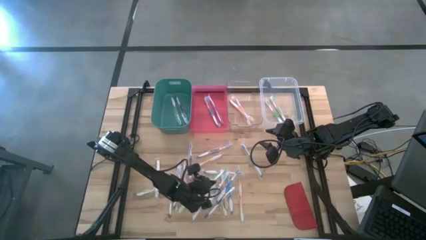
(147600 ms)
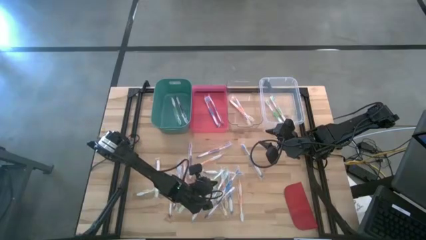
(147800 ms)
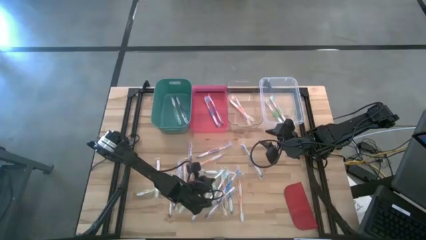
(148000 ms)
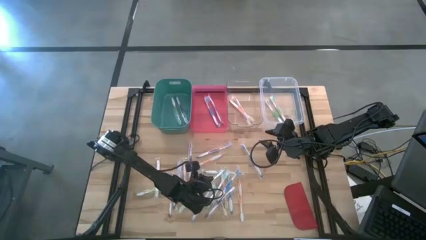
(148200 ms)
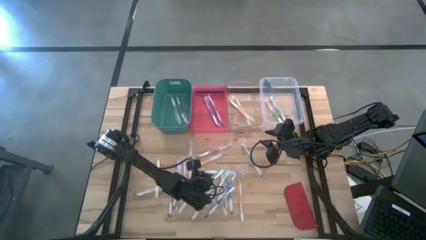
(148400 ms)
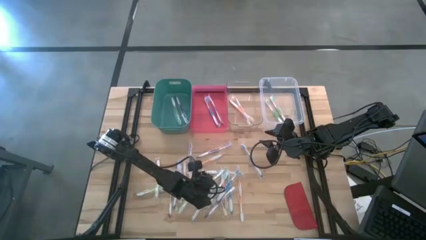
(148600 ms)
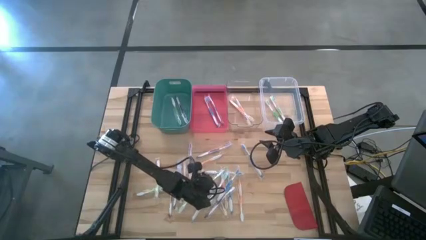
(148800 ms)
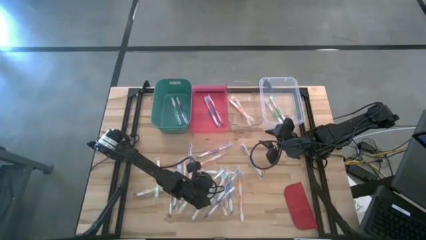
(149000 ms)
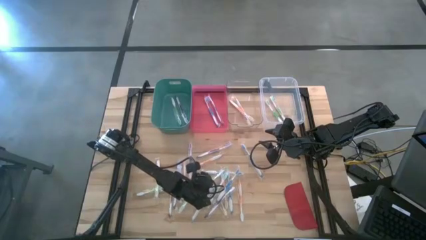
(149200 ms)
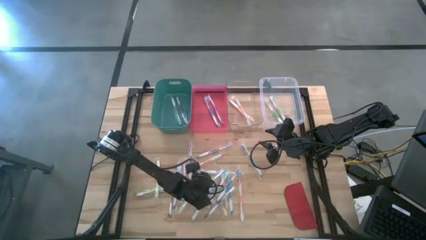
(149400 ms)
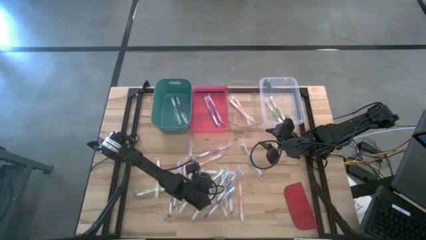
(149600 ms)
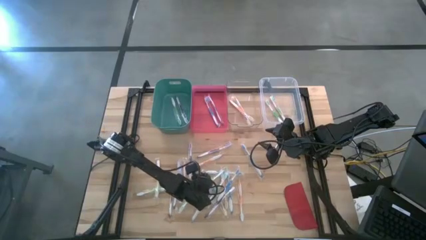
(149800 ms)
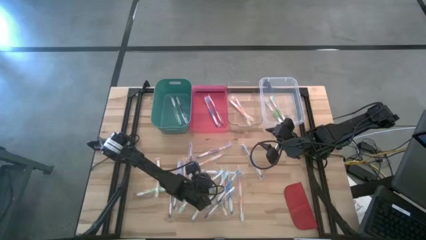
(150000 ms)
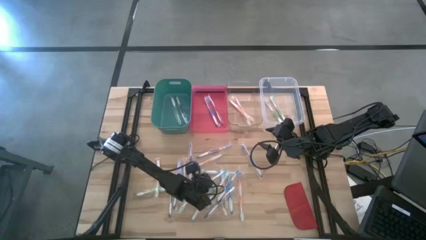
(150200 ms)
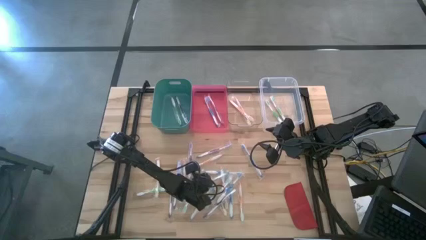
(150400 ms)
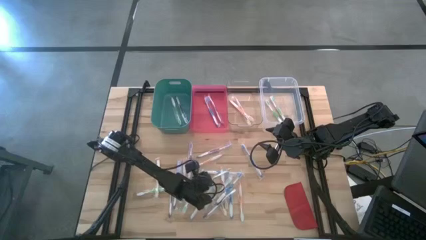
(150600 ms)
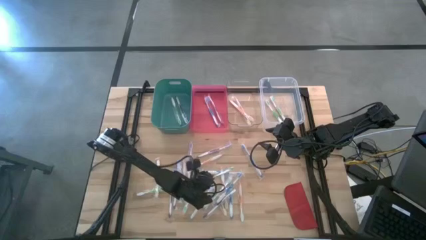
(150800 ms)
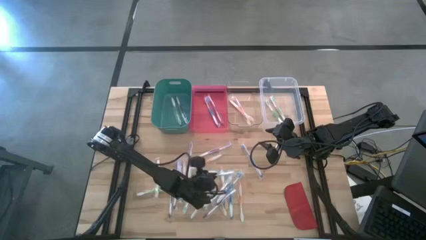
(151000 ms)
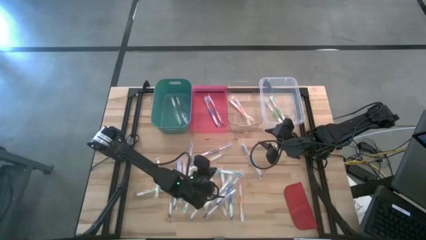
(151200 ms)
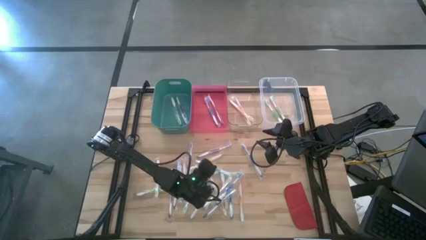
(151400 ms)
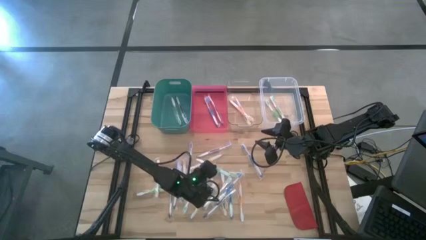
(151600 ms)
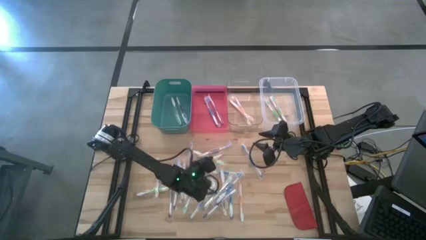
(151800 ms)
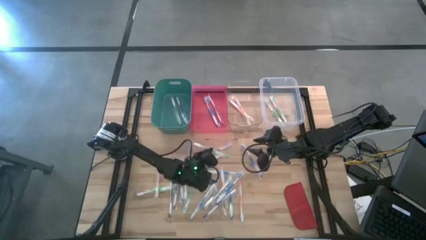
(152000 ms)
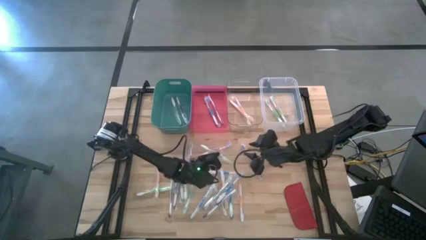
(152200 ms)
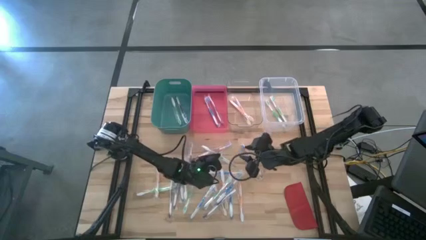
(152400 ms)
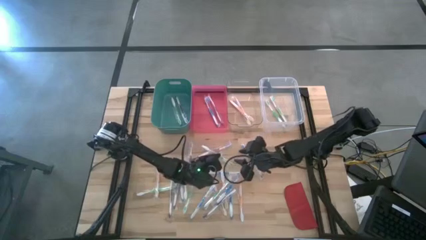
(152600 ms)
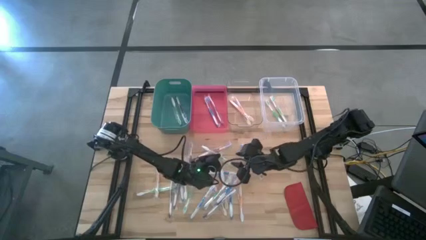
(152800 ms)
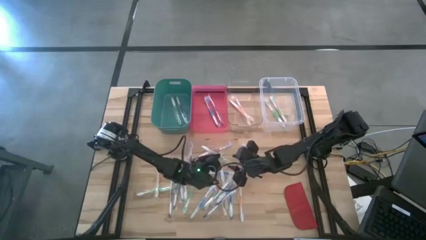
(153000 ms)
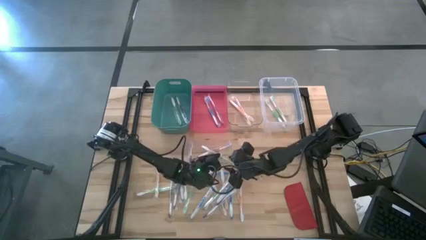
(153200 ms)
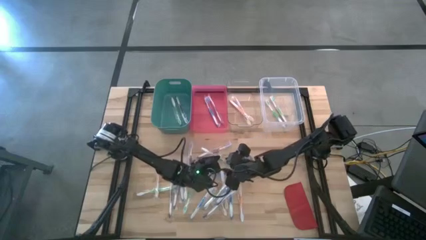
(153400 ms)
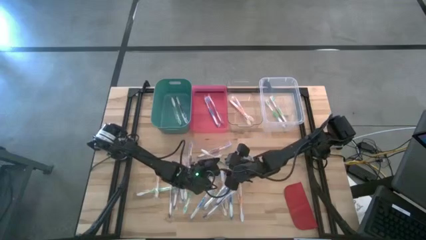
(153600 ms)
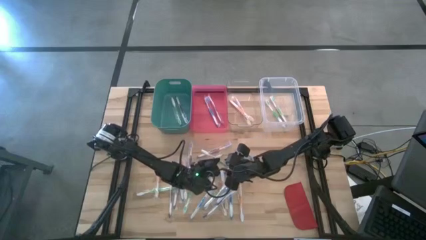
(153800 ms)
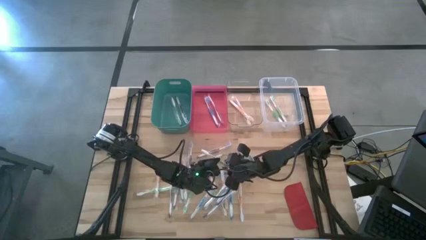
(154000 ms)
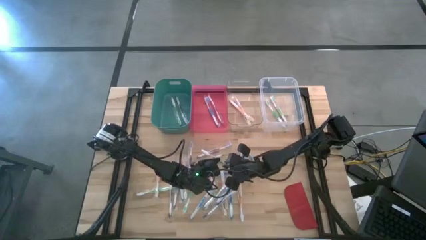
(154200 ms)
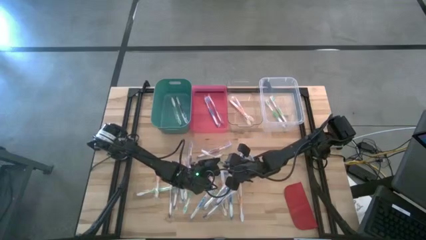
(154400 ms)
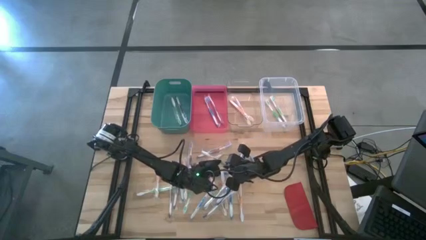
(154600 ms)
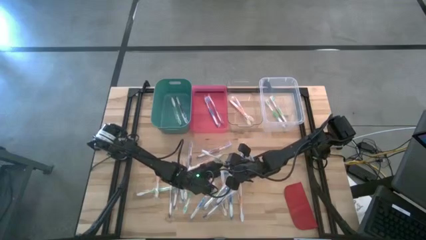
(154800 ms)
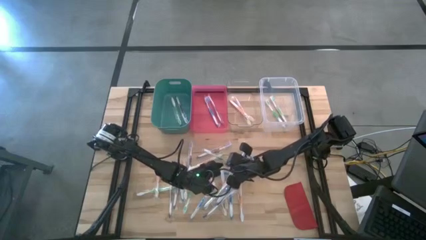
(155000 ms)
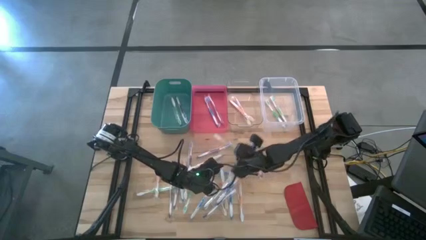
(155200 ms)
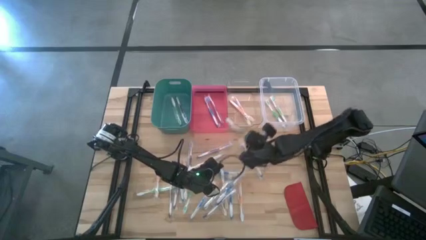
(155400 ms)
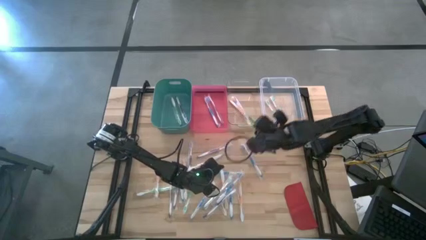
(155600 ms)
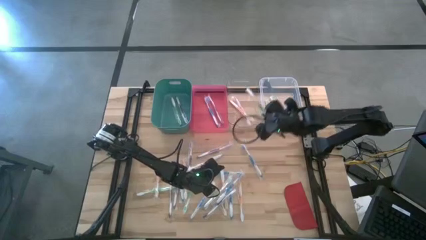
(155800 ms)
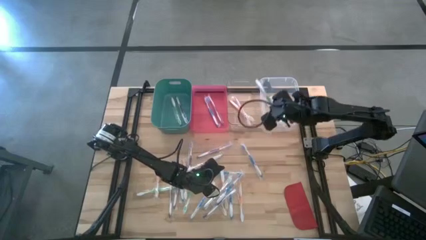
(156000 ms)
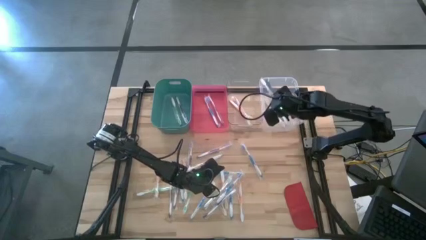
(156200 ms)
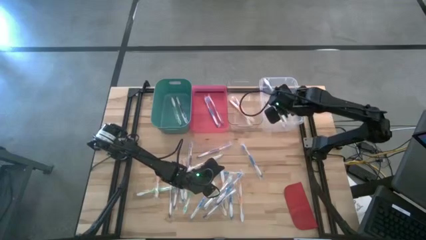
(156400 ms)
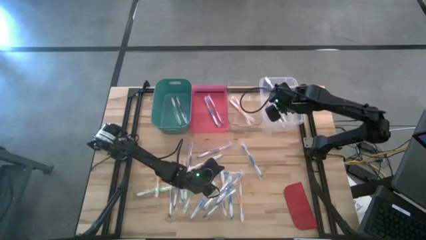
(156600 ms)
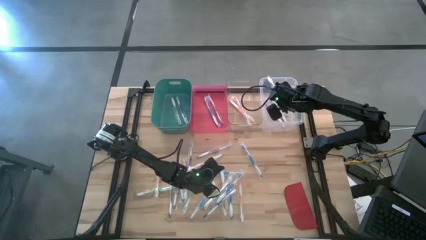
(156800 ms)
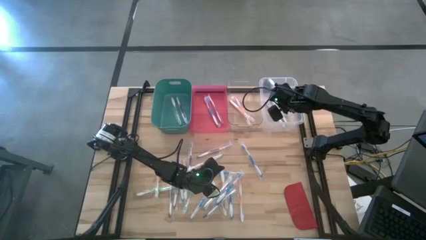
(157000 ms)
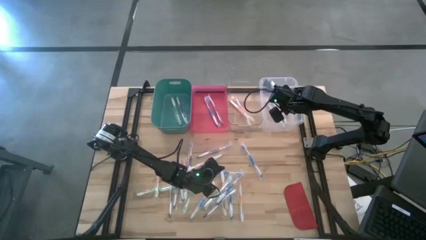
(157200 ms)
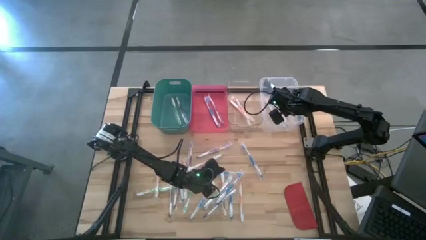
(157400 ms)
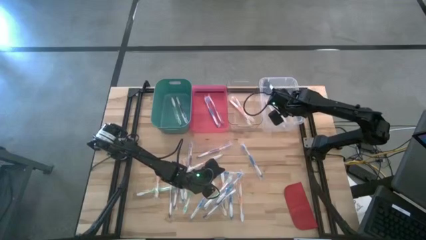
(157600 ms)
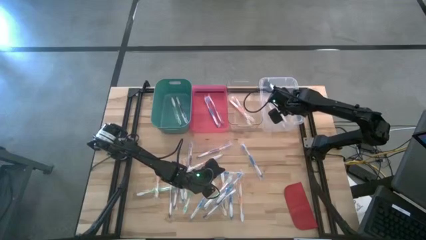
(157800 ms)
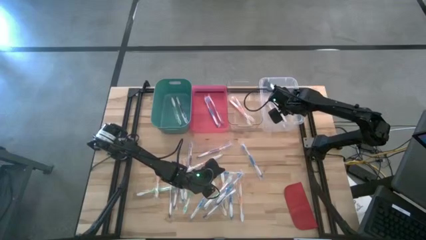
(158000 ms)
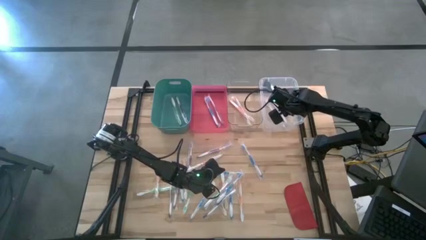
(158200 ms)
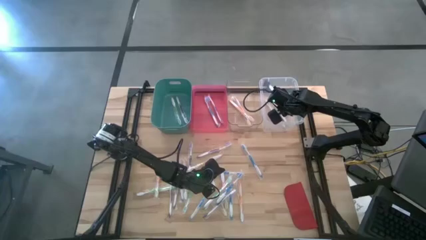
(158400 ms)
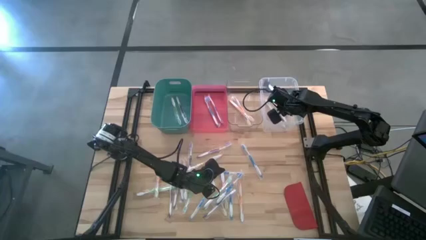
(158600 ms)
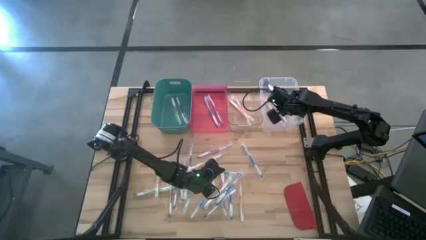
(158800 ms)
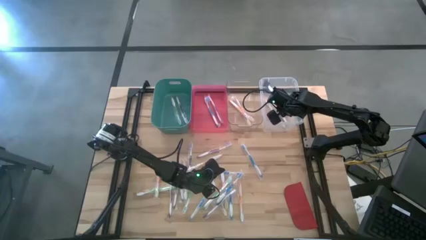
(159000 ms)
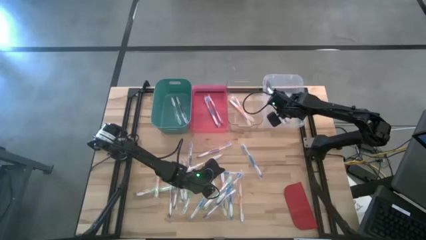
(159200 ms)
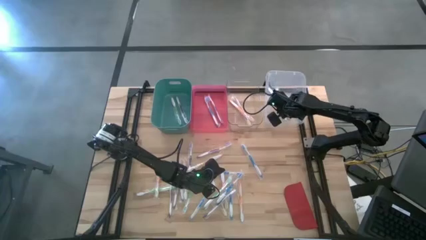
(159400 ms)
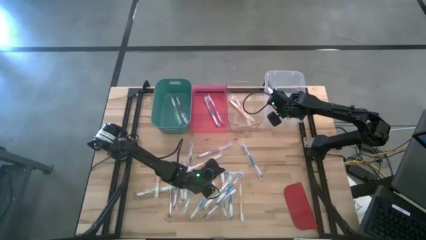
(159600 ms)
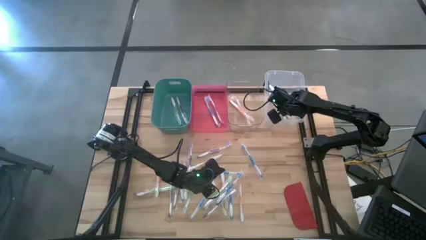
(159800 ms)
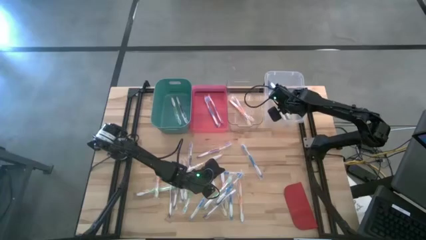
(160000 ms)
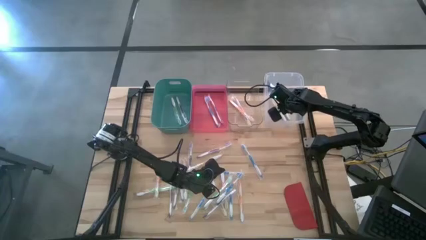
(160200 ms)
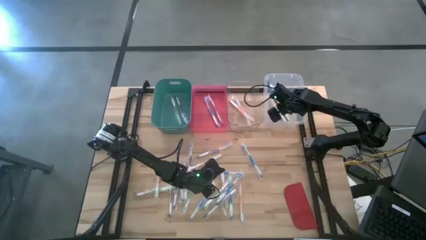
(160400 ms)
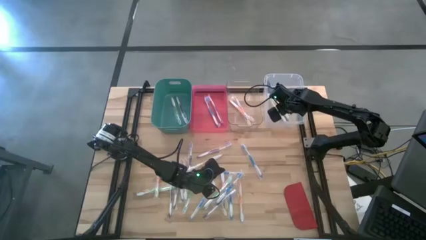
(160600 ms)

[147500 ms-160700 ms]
Task: Pick & Place Toothbrushes
Put the green toothbrush into the white bin

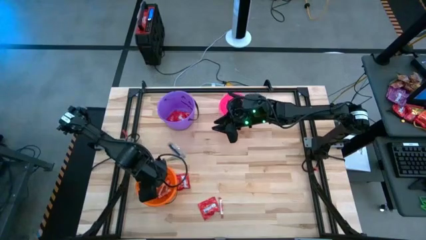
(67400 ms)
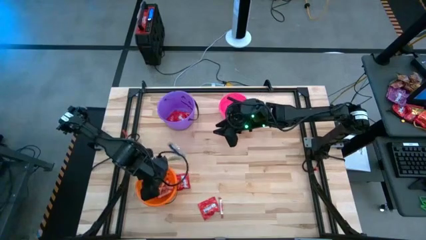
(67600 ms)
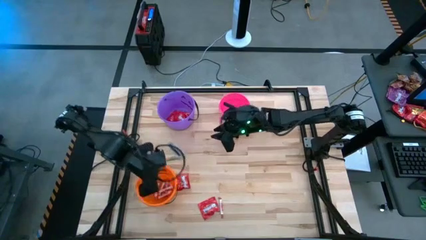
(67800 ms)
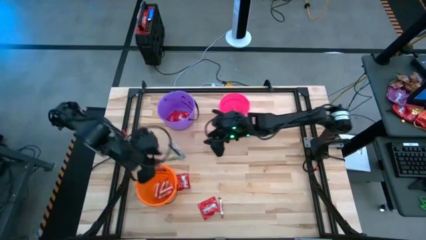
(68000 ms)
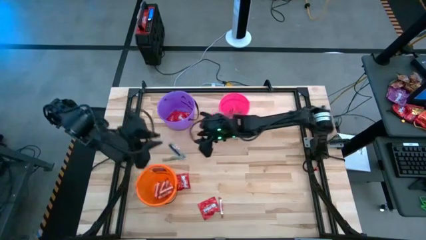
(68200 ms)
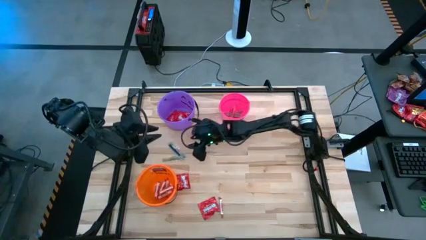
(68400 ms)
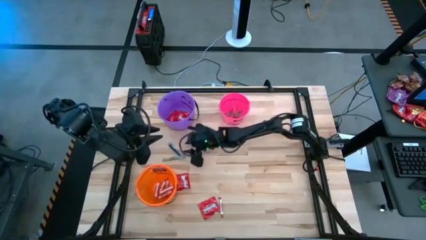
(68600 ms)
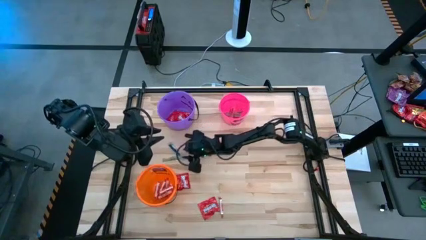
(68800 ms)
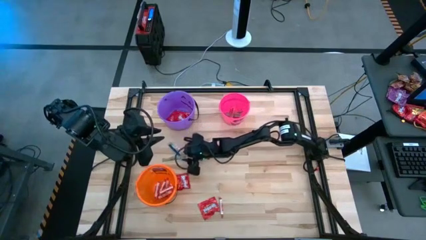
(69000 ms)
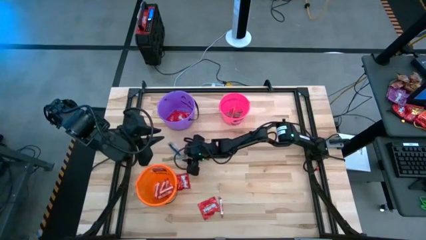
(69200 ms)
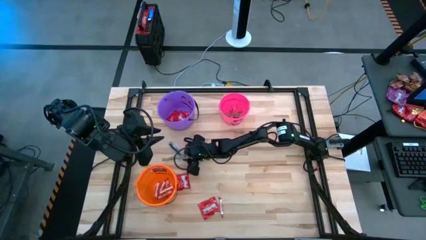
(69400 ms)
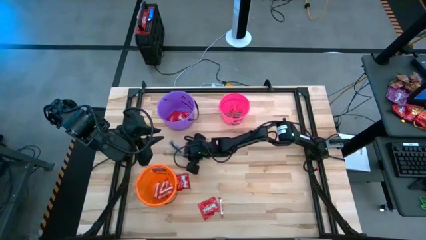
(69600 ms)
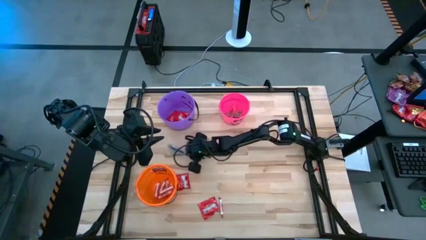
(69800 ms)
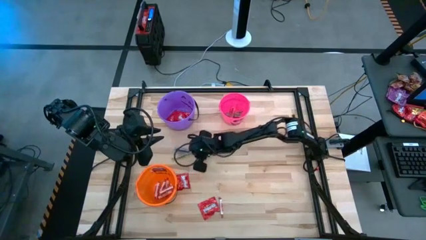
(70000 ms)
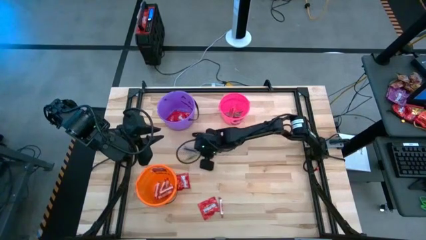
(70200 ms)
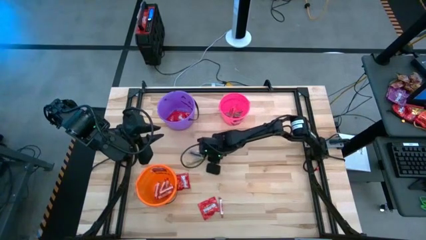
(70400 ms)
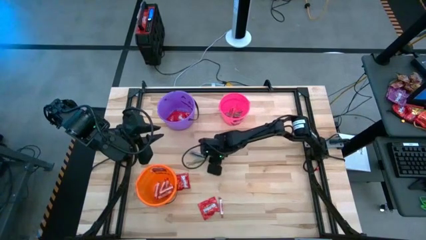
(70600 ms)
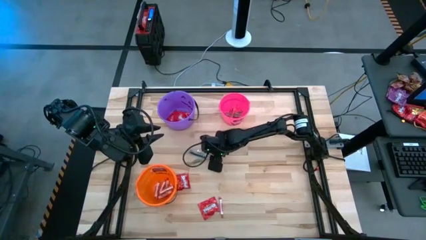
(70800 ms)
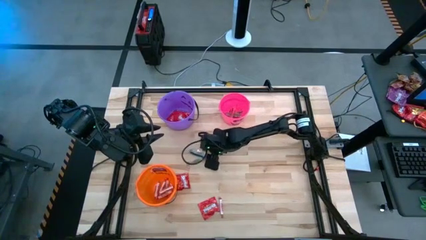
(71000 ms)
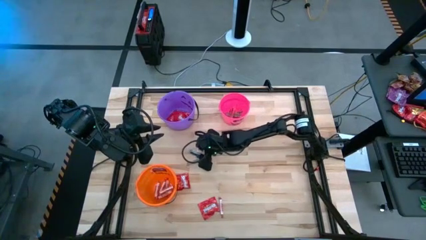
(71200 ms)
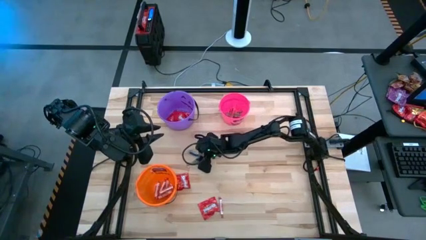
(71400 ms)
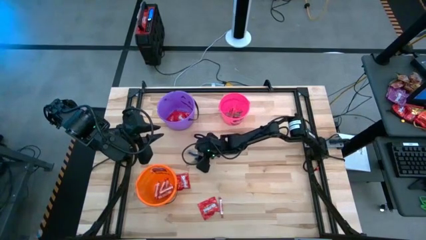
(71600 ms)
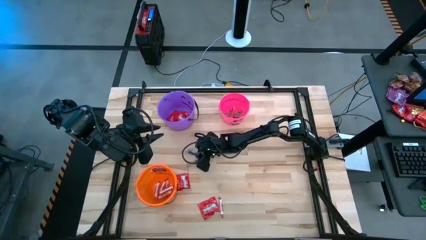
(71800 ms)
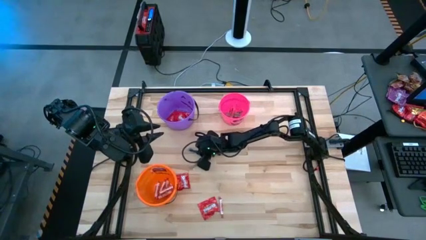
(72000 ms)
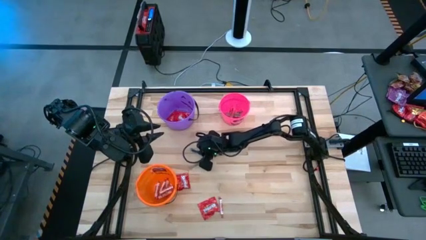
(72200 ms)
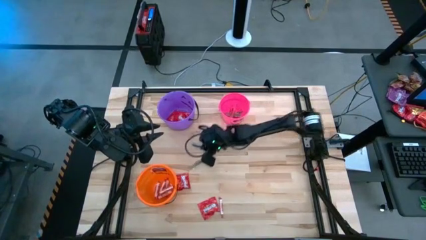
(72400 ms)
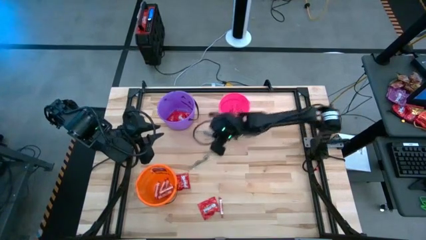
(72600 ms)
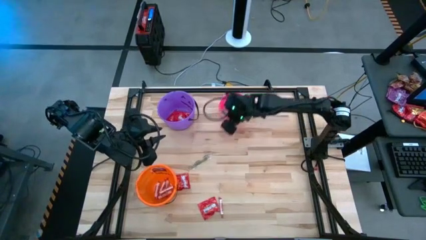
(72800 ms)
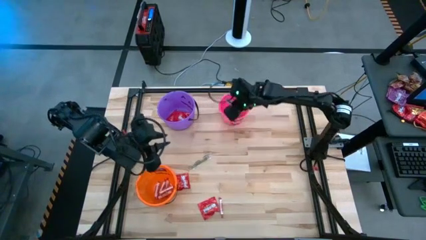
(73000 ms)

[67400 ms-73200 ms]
Task: Sort candy by brand, put in halloween buckets
Put the transparent blue candy into the pink bucket
